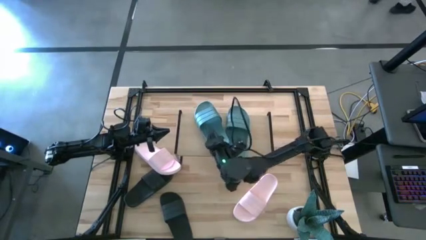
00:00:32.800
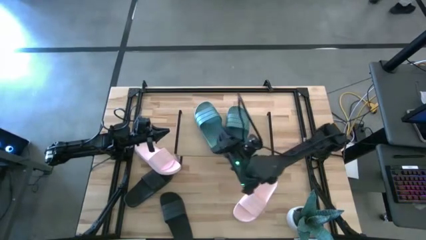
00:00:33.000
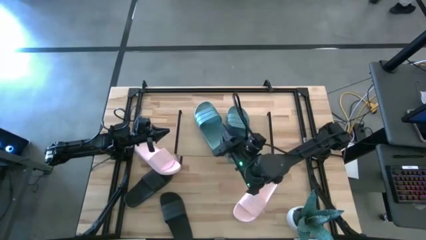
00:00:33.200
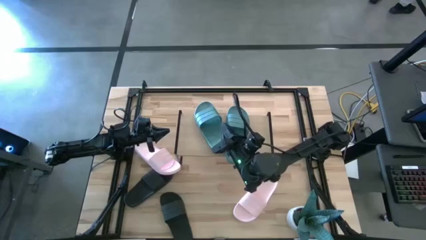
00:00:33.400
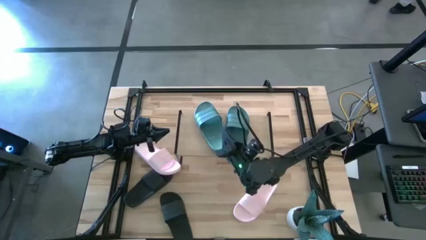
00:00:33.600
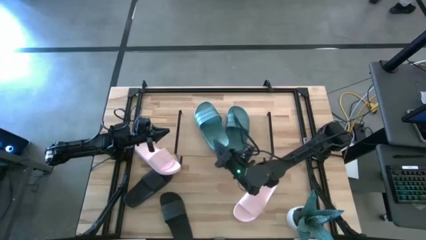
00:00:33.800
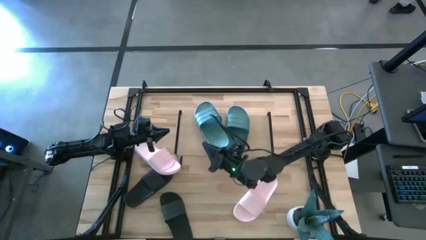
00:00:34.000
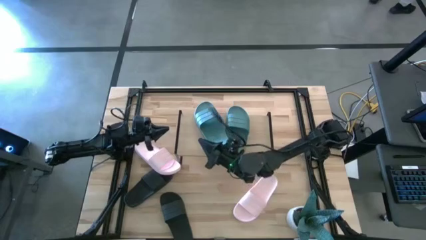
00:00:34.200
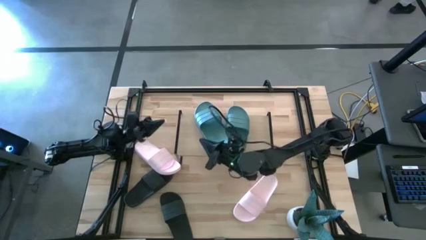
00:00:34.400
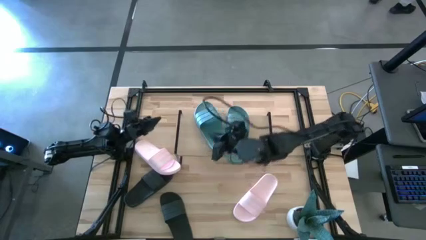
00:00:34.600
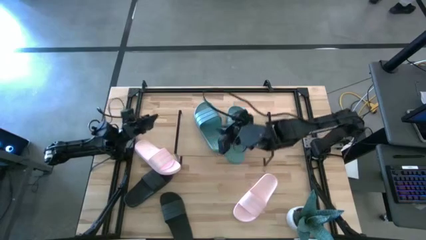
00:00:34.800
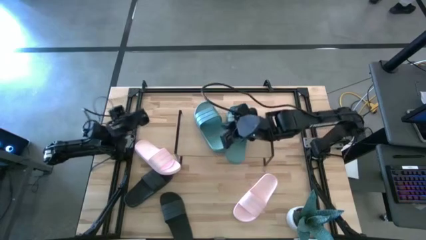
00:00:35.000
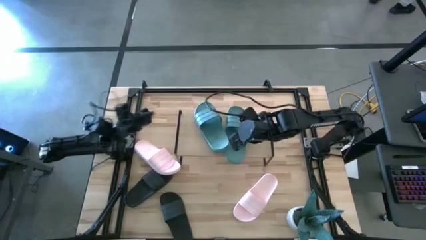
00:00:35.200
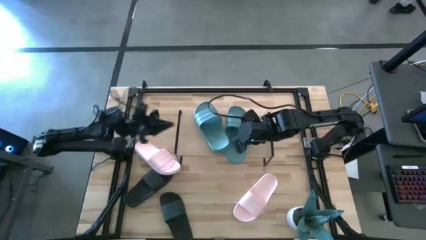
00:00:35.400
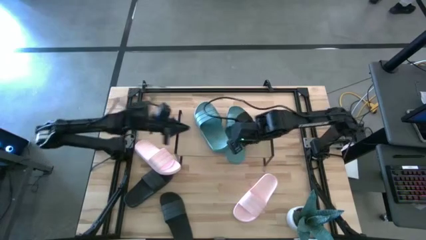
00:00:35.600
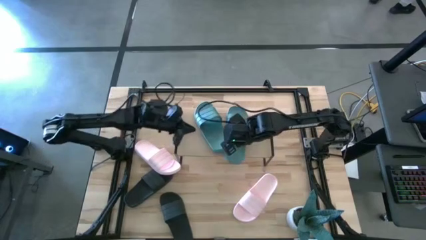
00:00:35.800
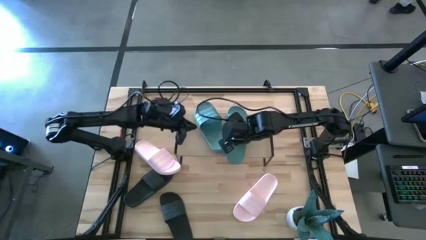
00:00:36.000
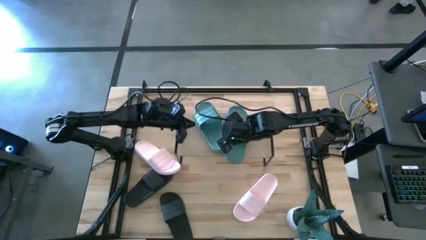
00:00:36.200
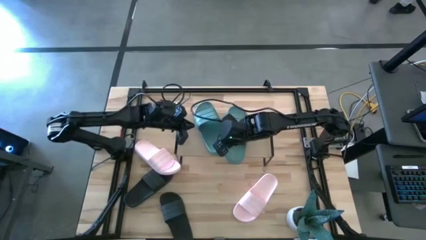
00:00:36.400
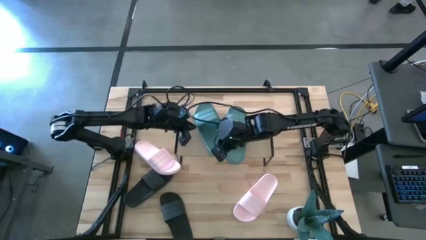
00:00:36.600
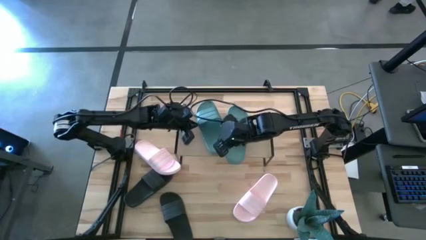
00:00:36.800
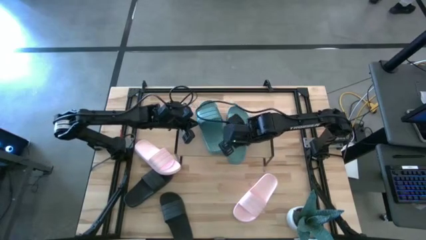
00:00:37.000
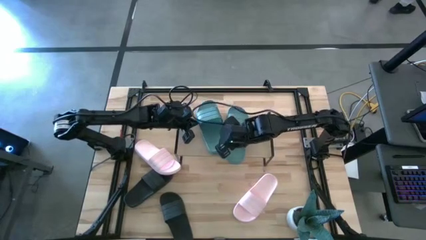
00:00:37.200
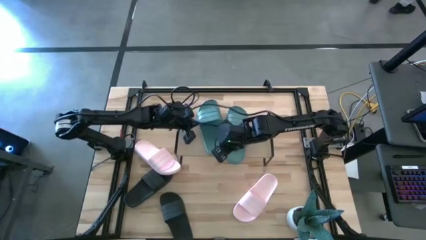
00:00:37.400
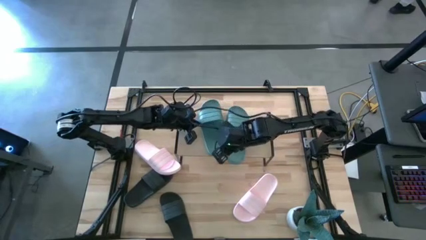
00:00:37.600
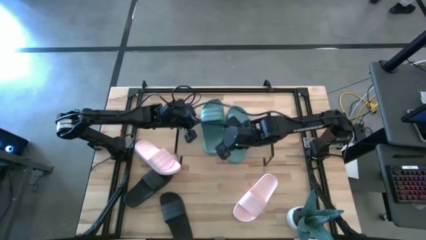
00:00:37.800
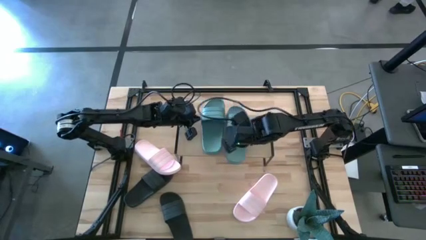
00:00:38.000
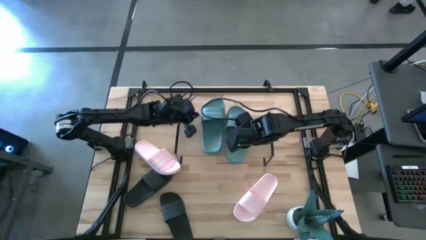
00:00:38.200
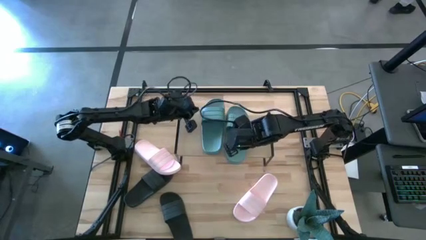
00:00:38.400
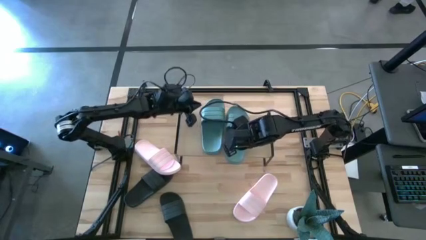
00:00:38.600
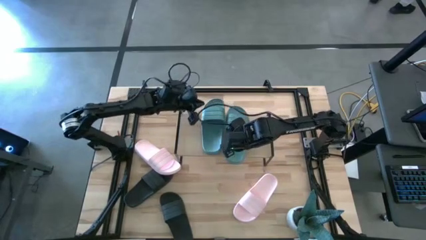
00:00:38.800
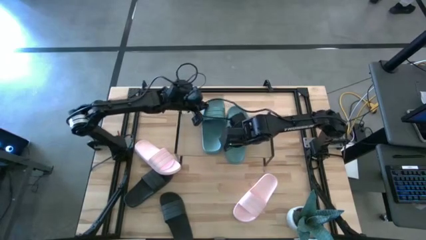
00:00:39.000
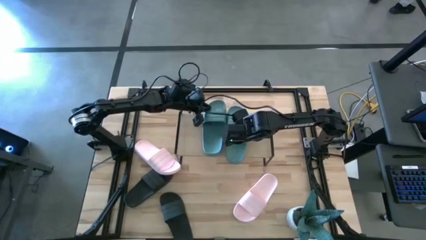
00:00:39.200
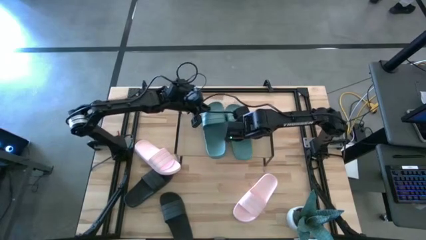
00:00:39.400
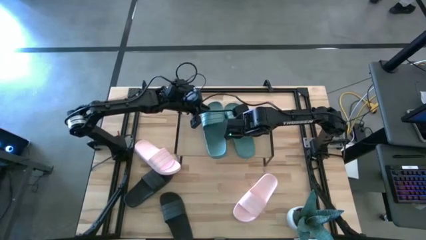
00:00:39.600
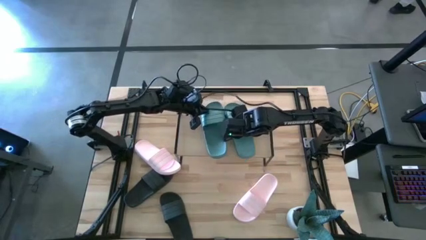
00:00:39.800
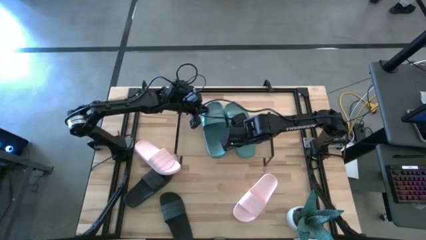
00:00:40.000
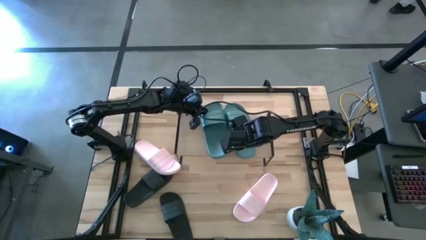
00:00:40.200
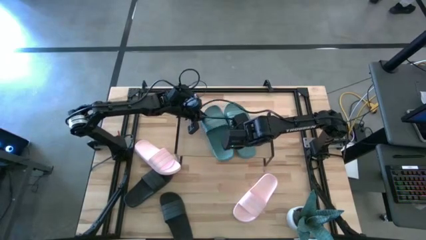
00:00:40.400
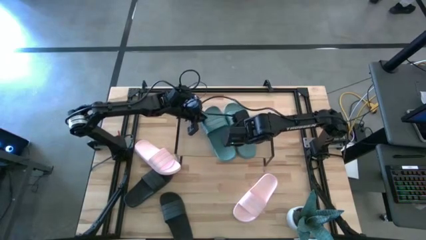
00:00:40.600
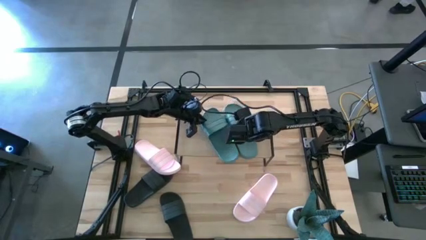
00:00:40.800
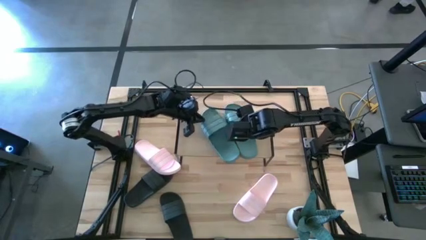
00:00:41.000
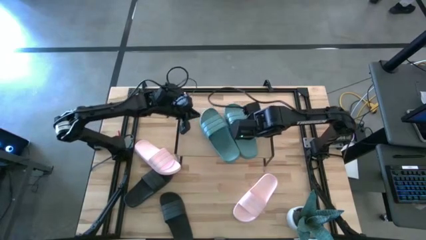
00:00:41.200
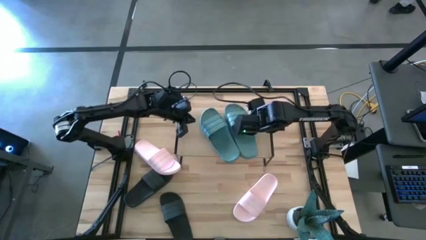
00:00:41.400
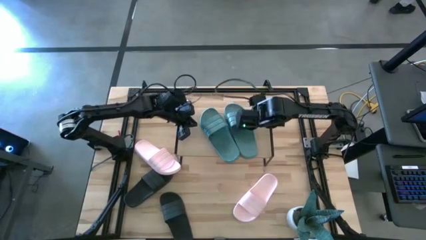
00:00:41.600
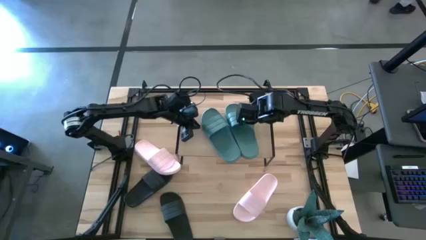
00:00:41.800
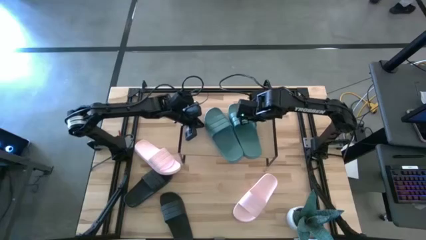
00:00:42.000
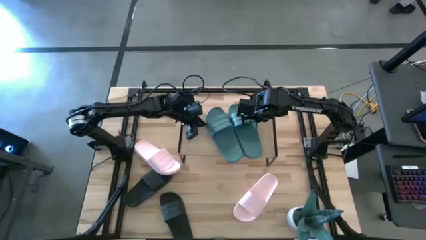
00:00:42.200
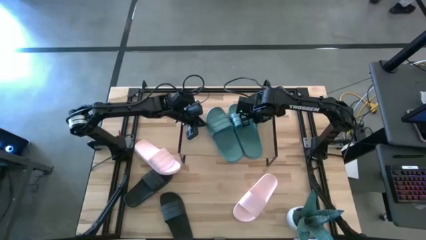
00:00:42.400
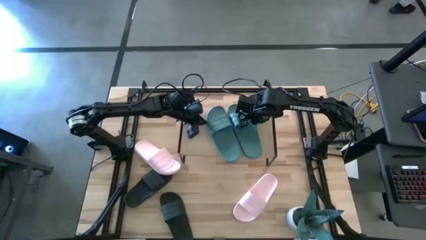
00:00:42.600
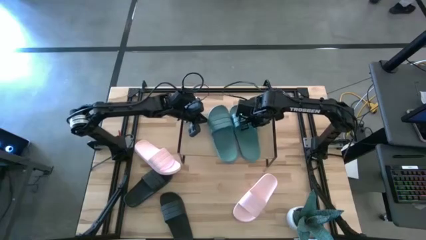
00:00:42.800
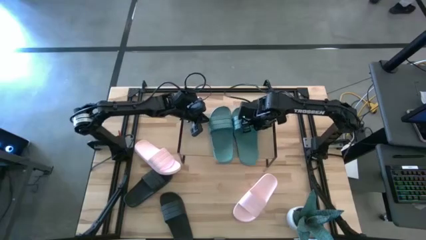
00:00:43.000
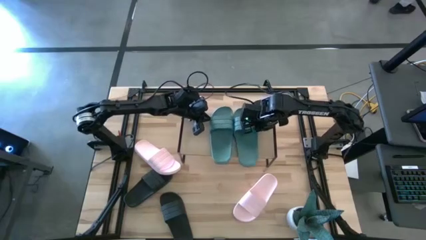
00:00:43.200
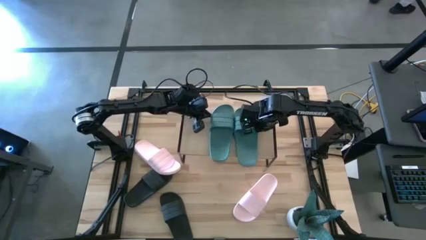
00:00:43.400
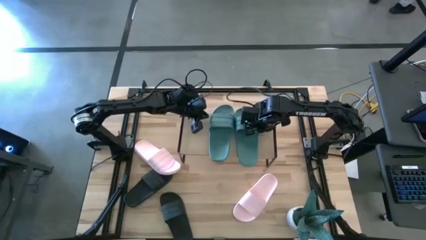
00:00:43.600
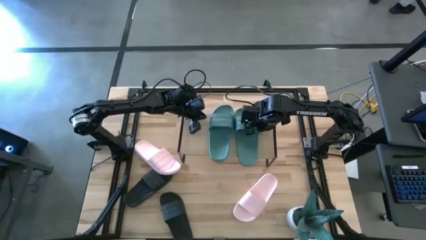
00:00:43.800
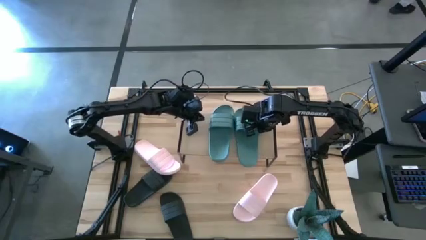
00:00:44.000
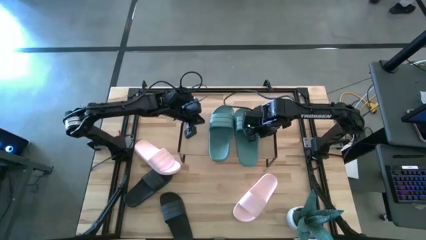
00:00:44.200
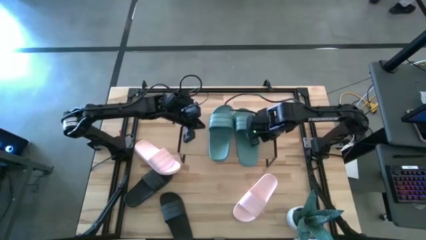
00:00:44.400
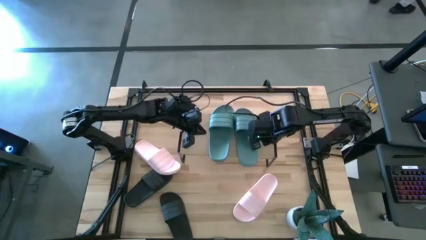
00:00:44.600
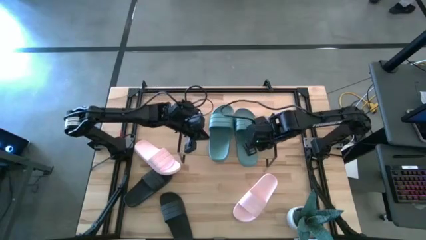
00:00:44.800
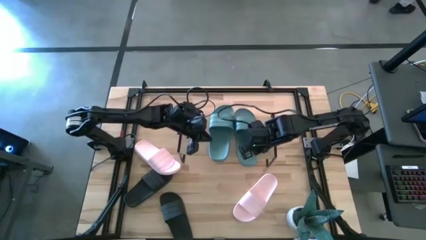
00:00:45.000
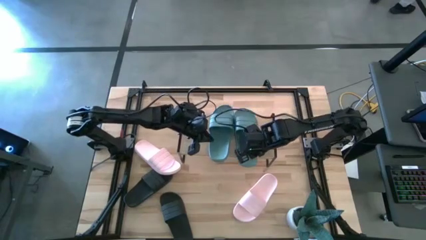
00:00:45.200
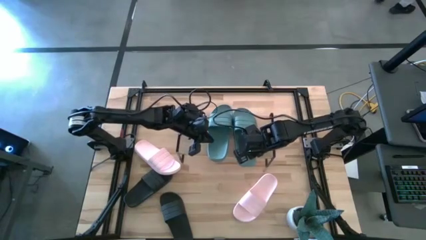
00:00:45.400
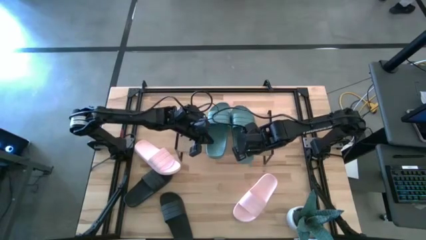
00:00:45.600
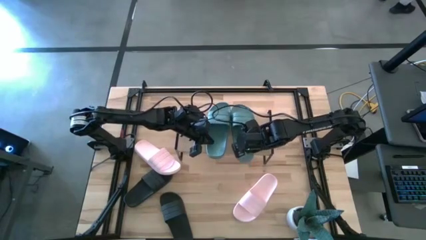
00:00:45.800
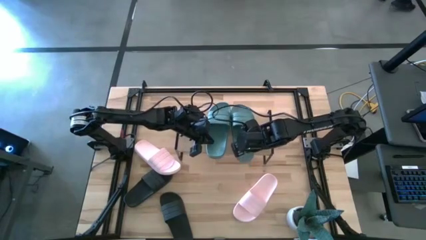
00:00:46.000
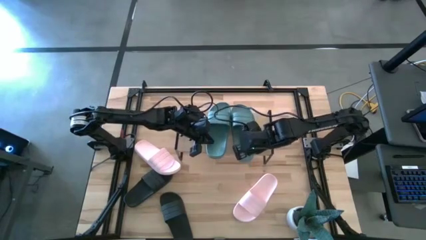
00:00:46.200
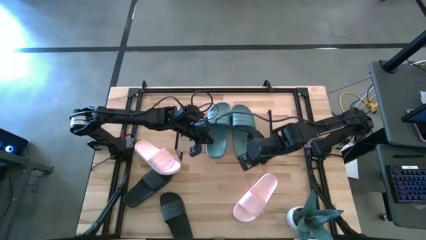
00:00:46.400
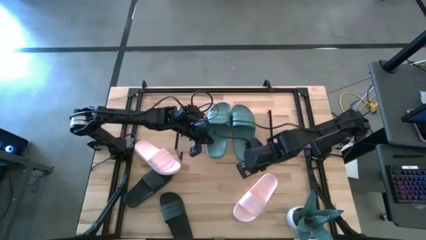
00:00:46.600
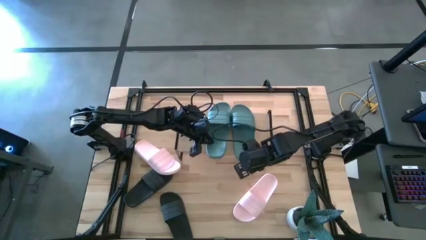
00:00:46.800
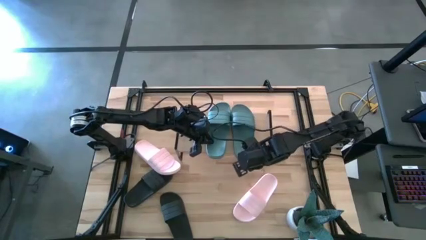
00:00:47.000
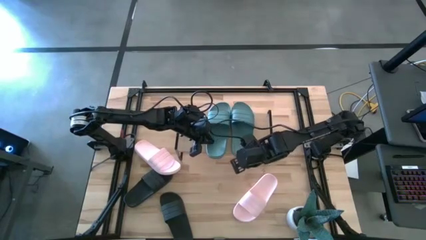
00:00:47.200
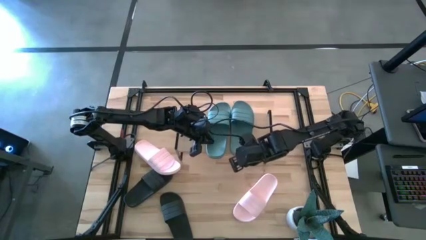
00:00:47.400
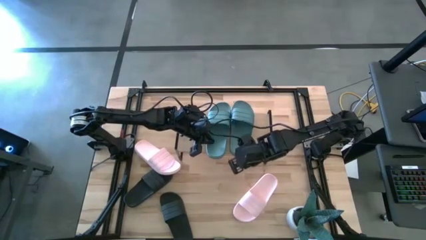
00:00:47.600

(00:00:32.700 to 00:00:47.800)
Task: Pick and place slides into the shelf
Adjust the green slippers on the shelf
